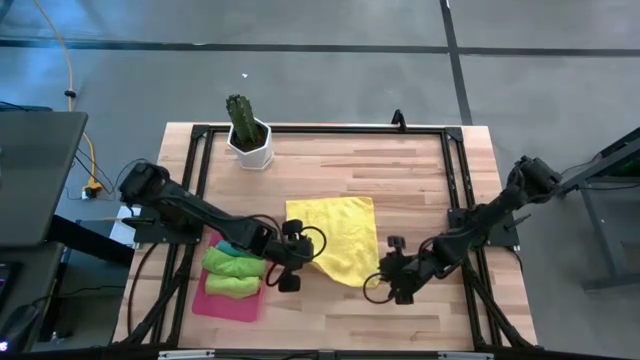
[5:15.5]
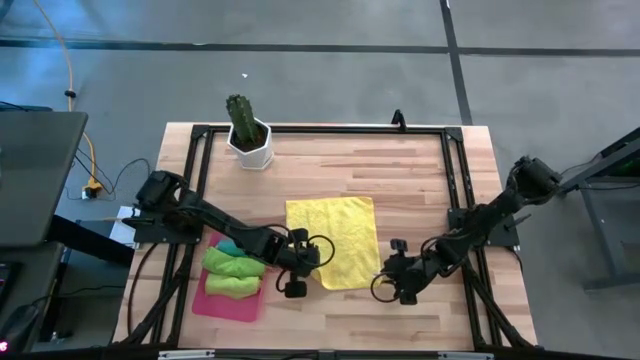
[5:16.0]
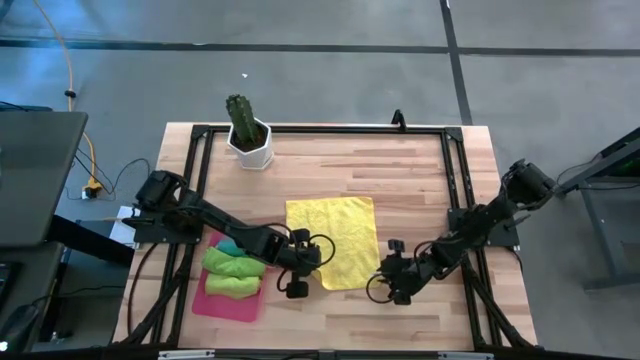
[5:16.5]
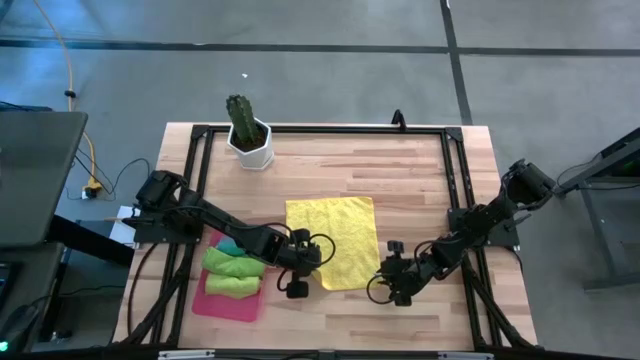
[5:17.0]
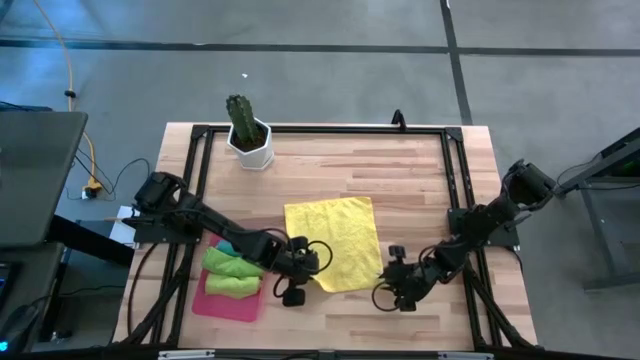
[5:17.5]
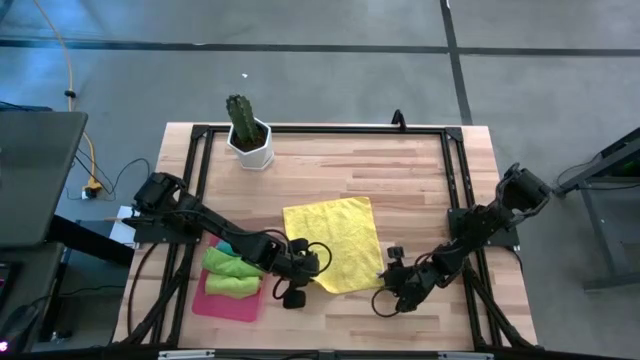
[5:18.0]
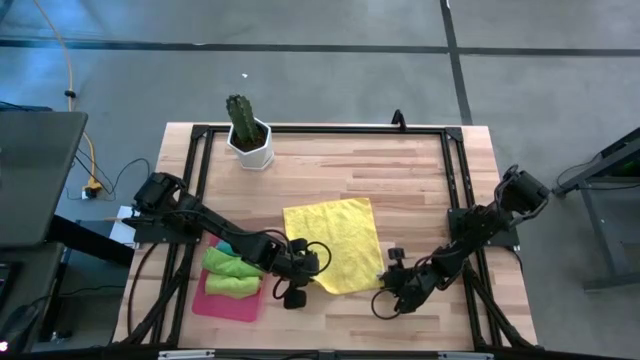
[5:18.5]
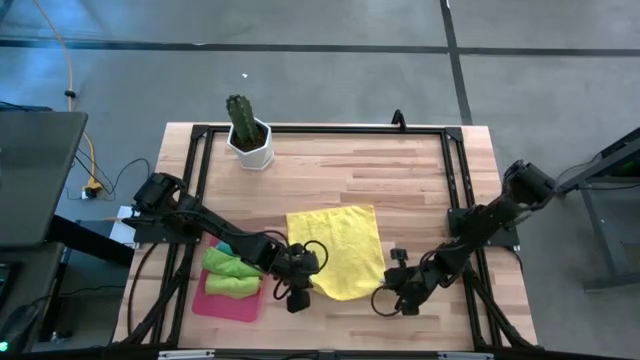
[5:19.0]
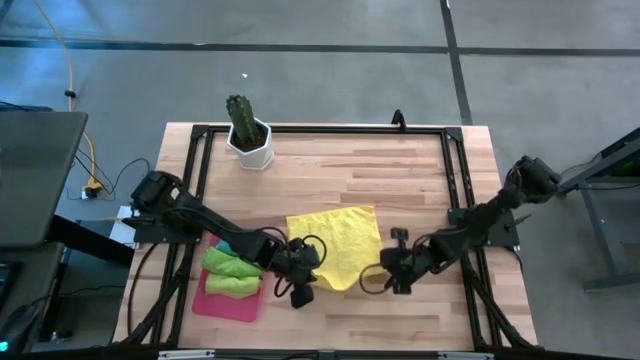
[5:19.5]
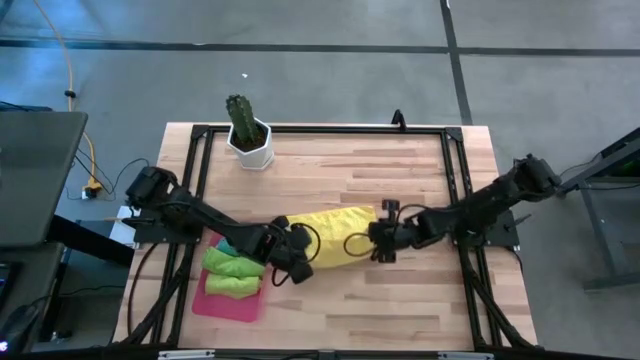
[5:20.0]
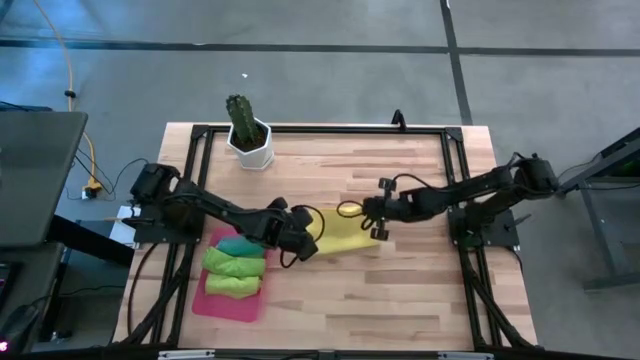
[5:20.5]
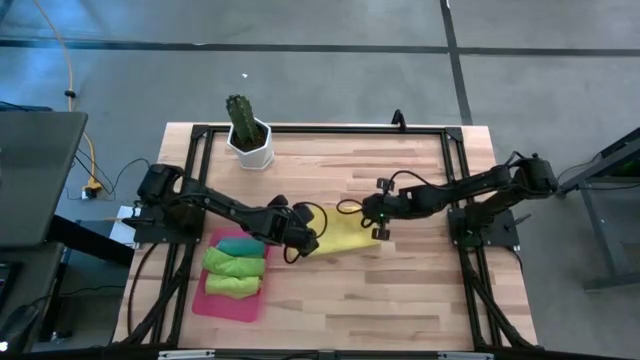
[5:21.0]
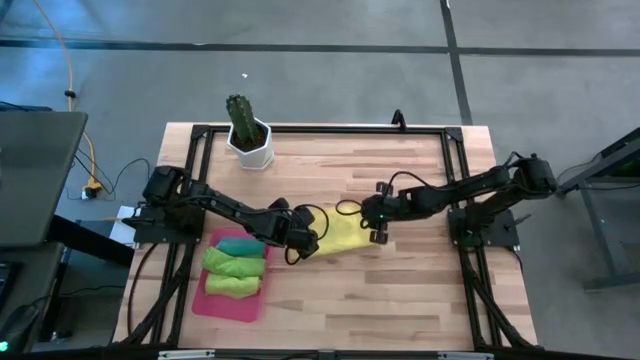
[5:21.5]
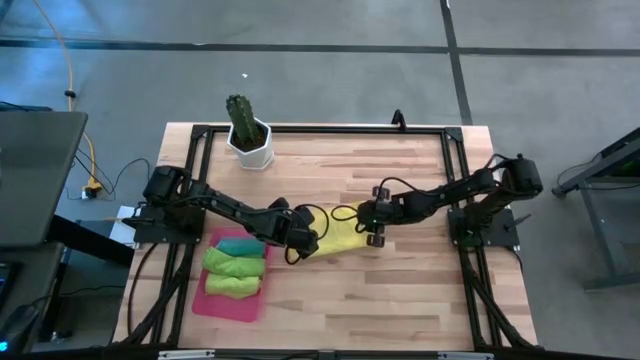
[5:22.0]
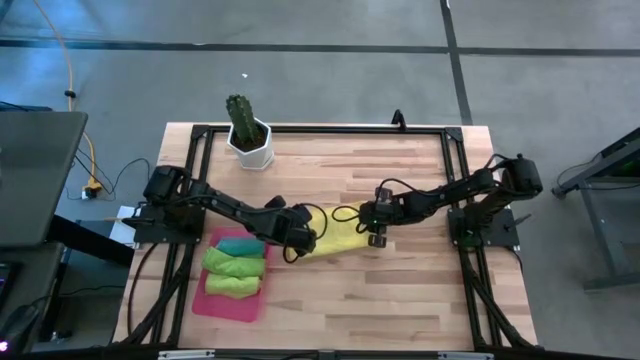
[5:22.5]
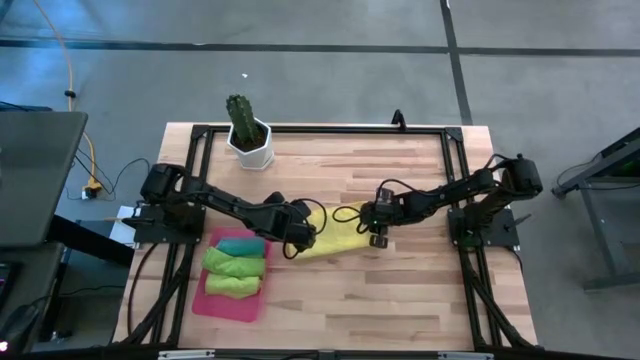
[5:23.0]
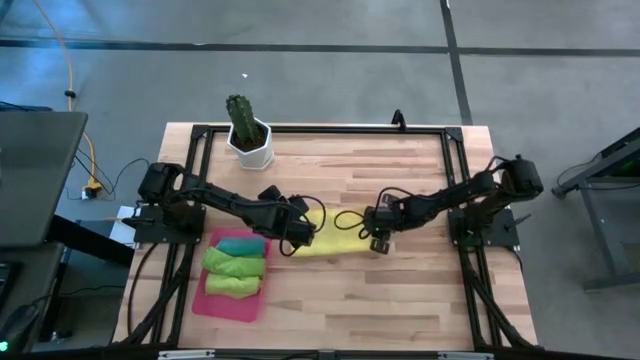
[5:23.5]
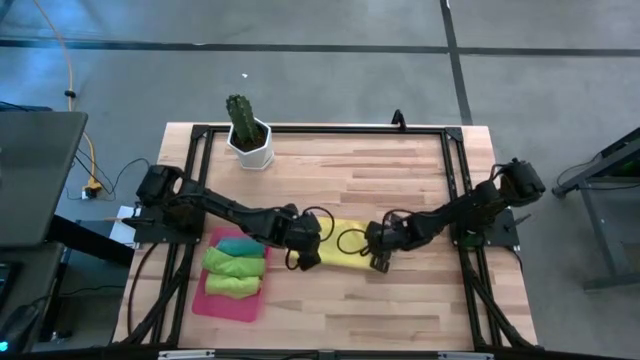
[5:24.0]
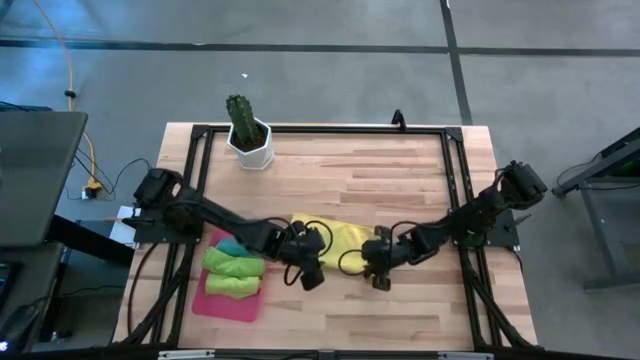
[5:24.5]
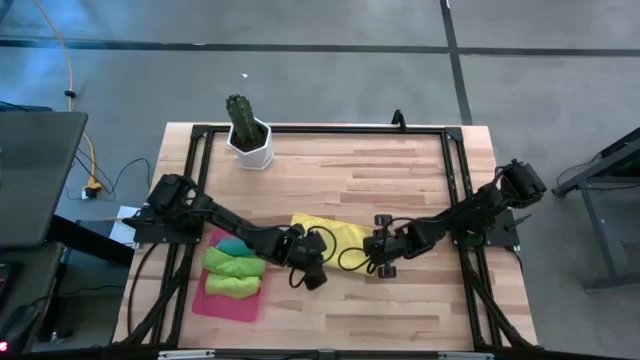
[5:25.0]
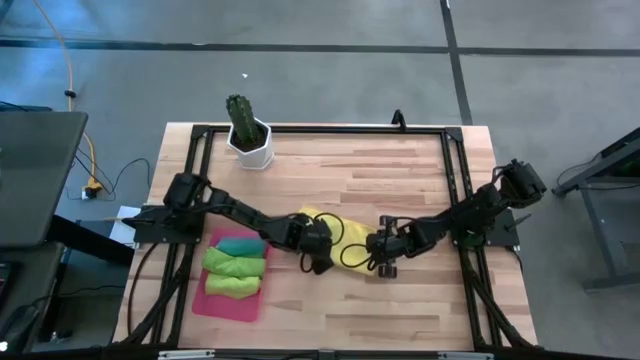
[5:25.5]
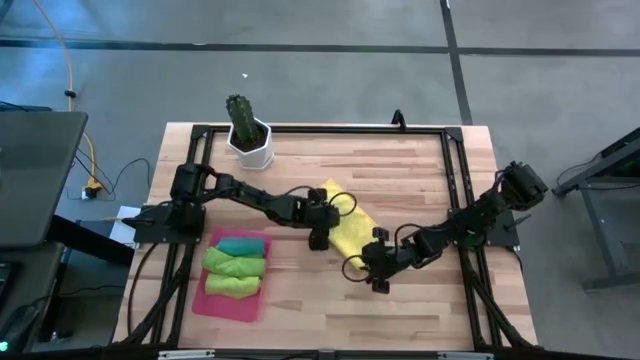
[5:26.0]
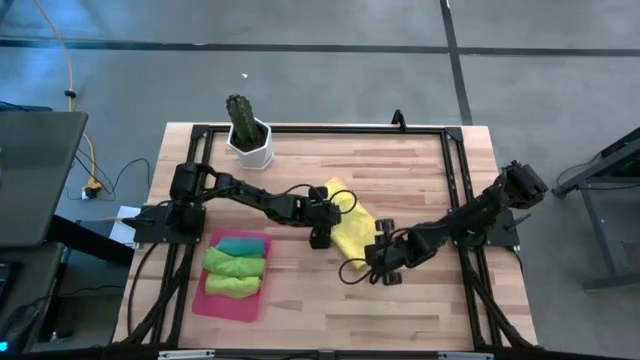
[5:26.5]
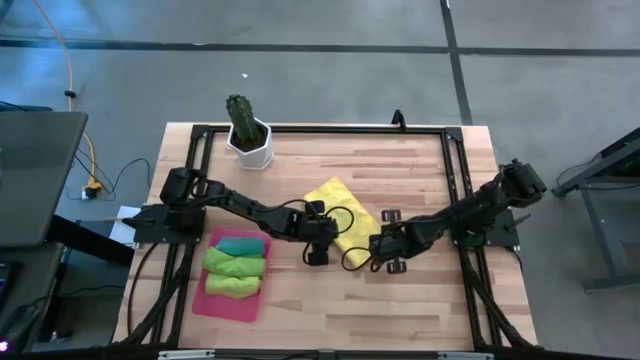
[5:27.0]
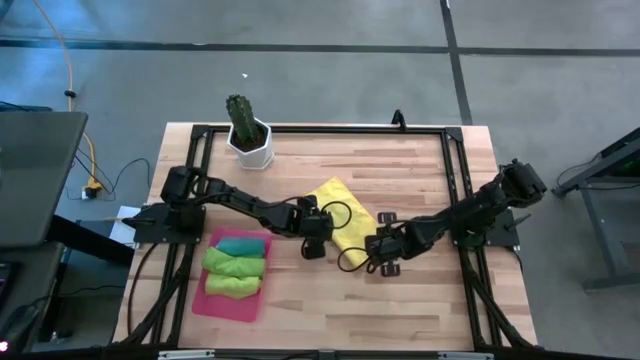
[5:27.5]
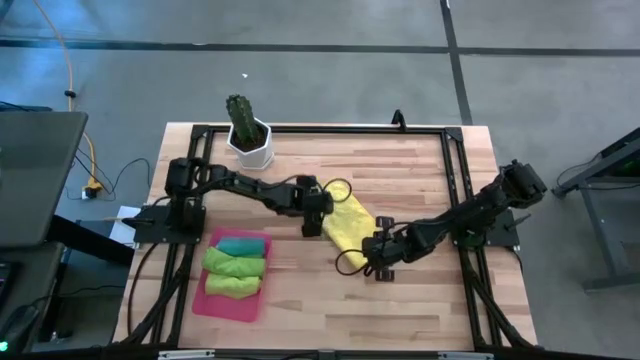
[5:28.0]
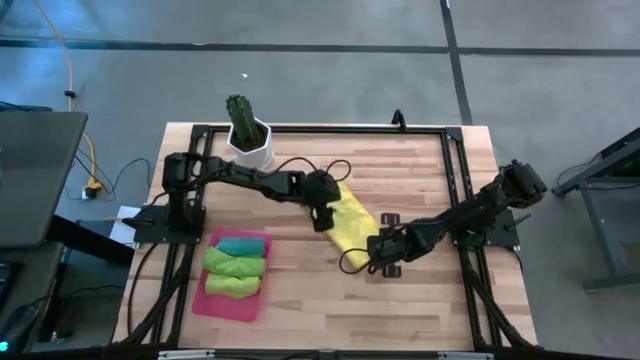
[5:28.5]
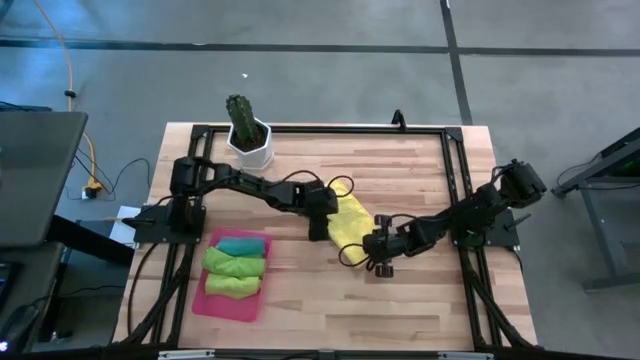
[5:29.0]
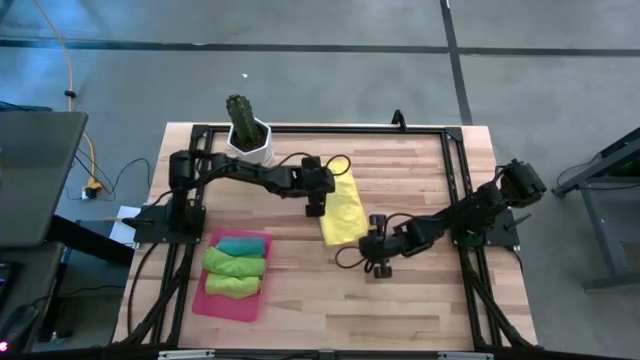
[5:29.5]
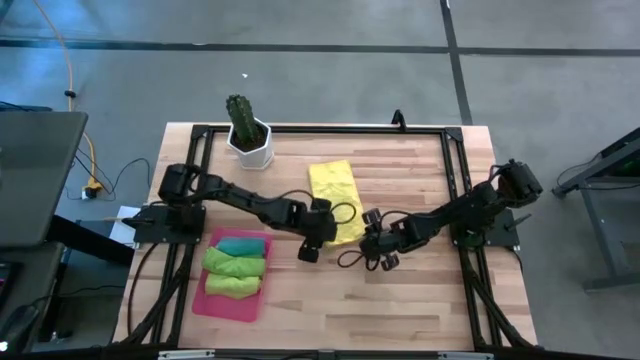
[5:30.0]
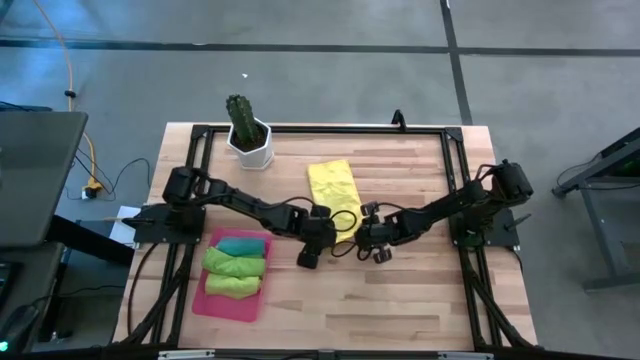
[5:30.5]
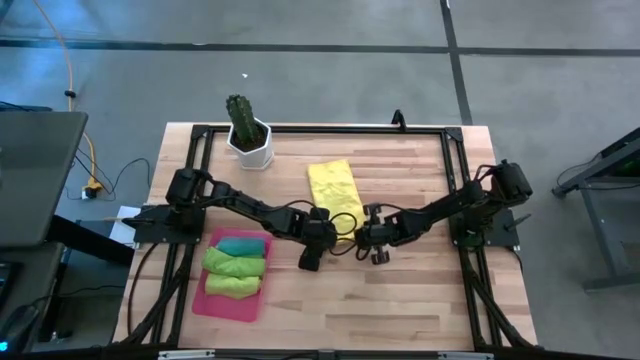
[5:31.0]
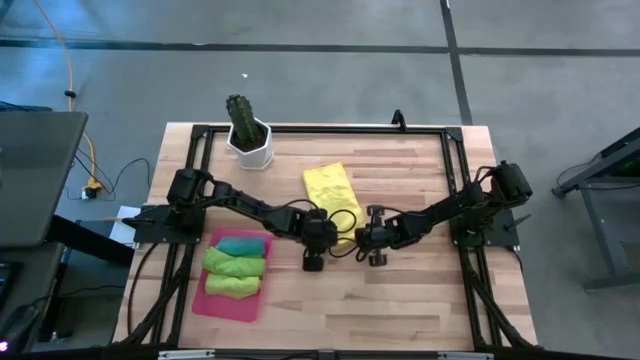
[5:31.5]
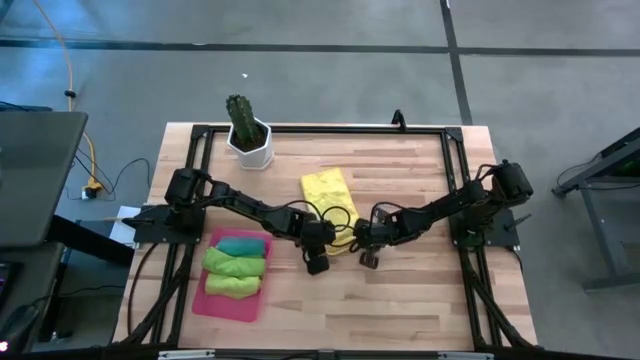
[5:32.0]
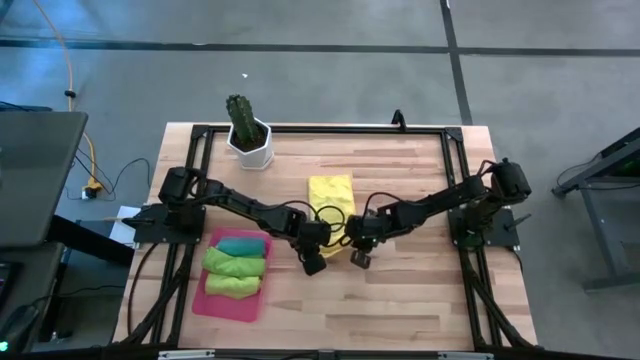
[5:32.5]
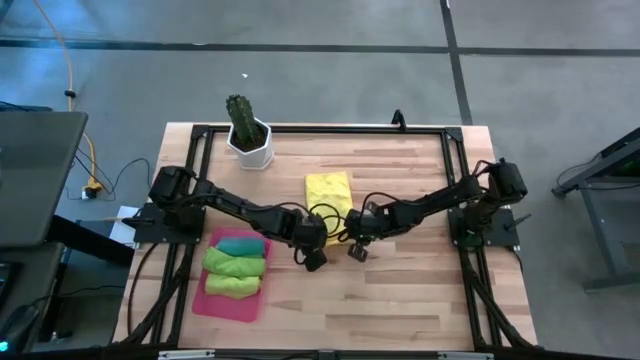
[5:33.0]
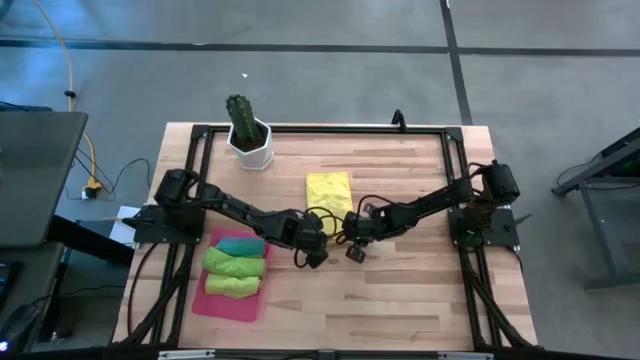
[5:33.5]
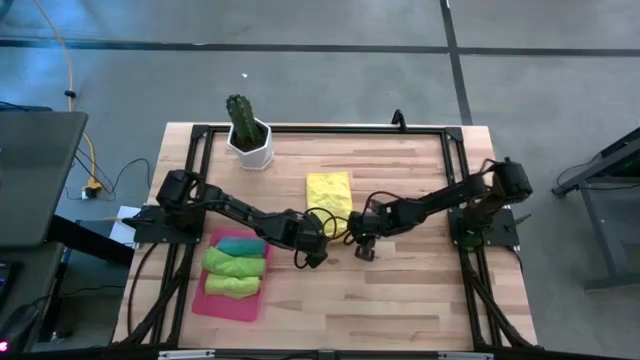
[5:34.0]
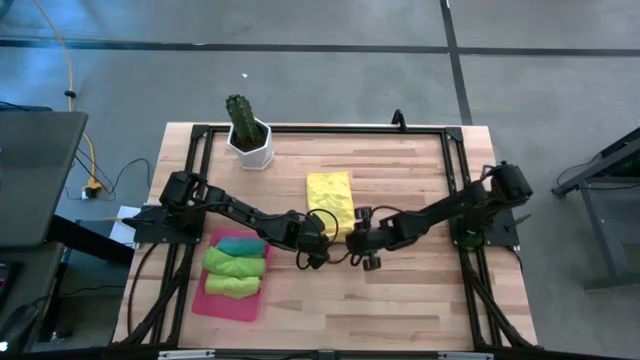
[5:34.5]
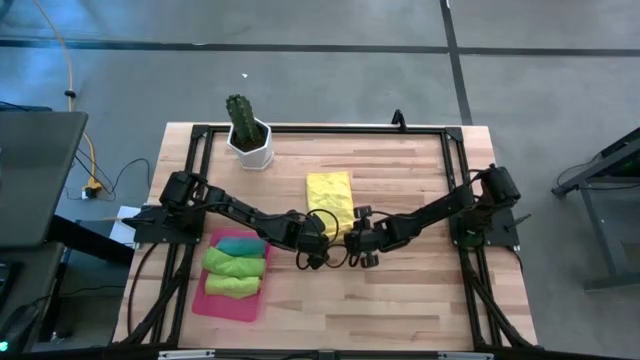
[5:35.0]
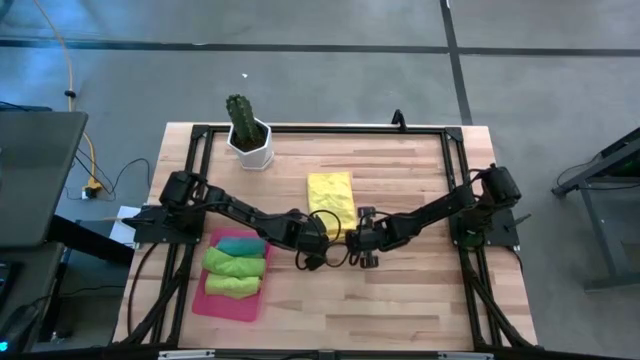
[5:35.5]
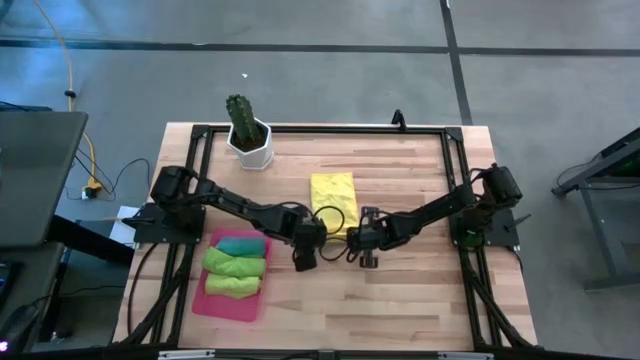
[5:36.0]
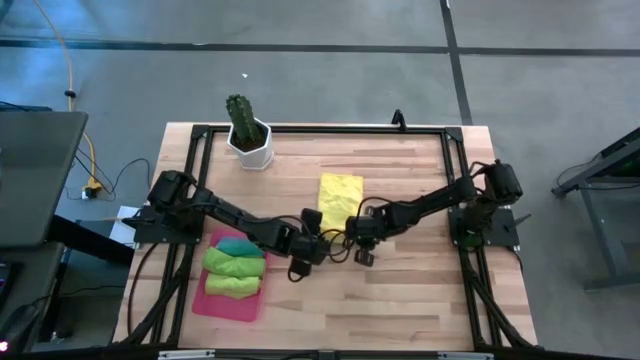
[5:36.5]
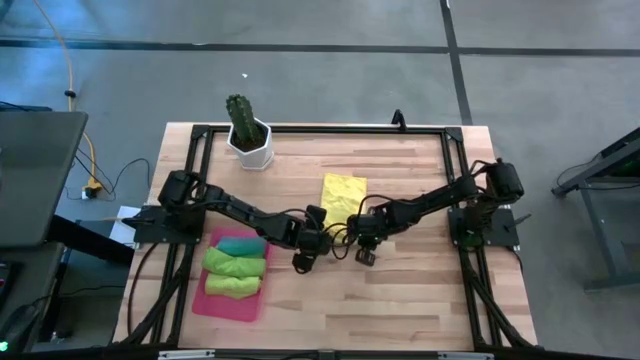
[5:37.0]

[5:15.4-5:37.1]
Task: Roll microfiber towels into tight, uniform cylinder then place into a basket
Roll the yellow towel
